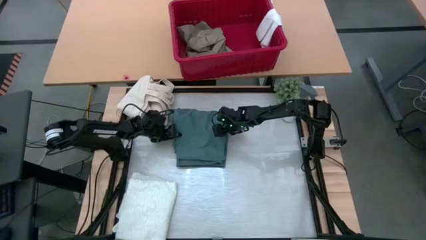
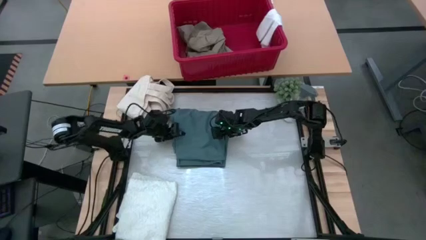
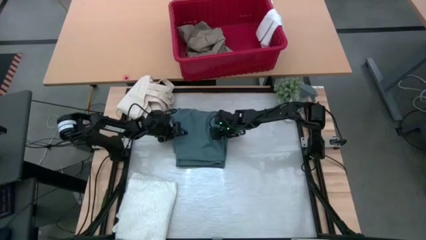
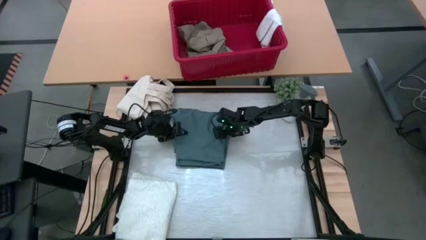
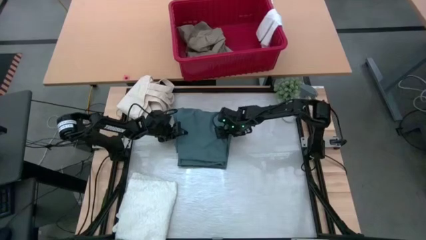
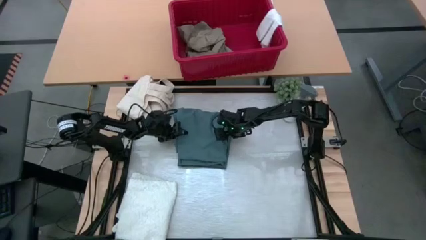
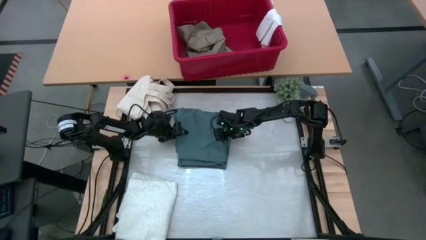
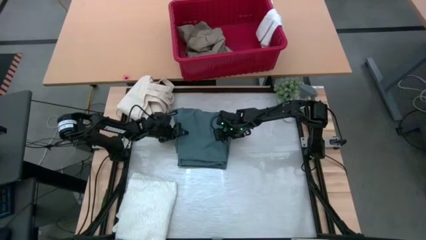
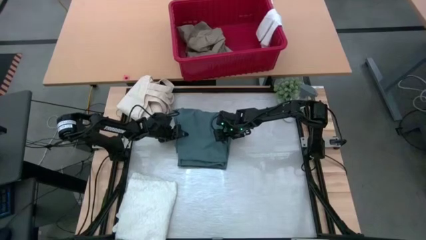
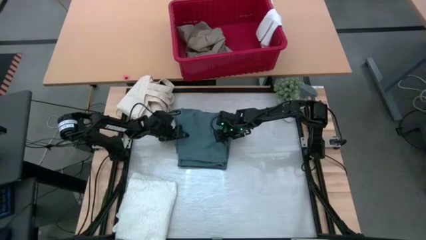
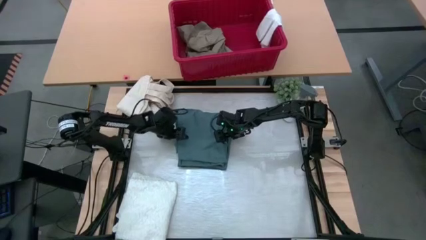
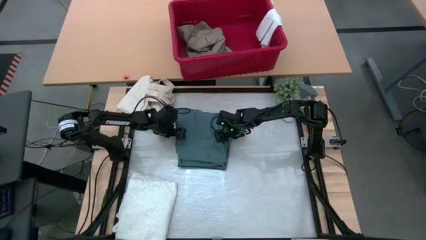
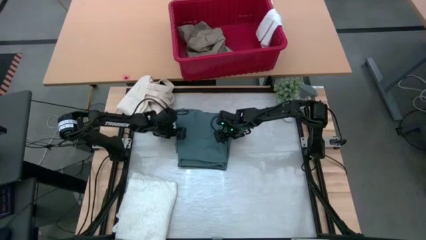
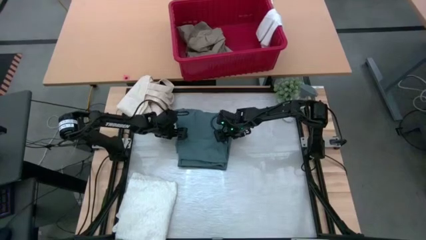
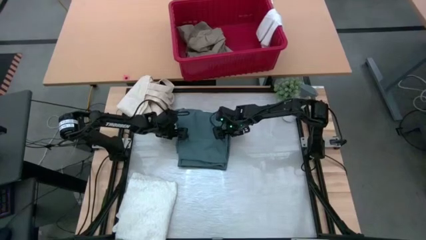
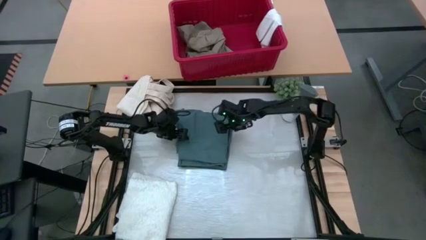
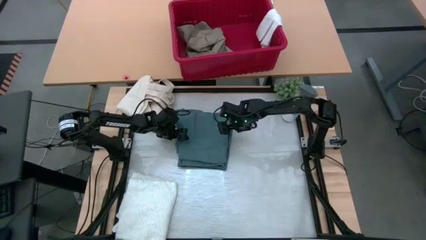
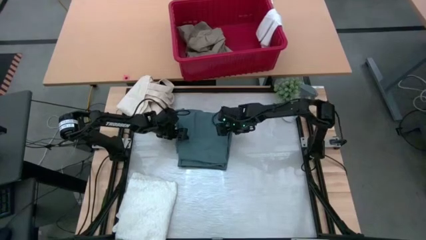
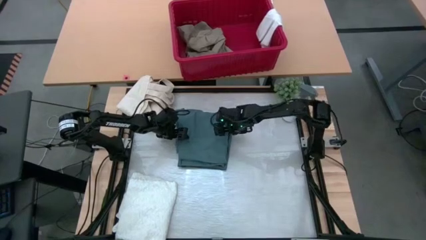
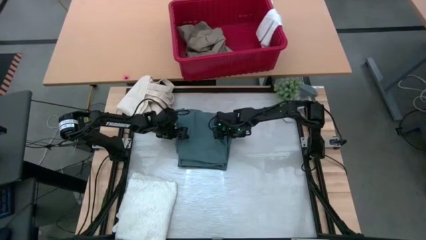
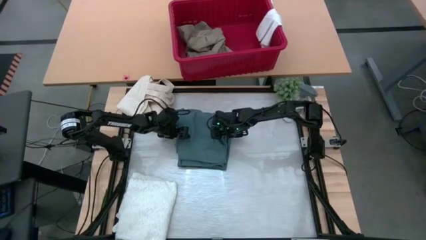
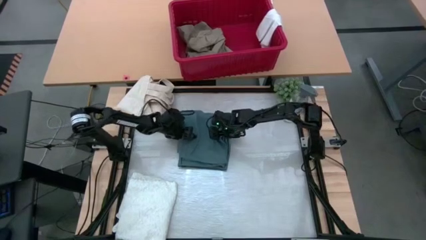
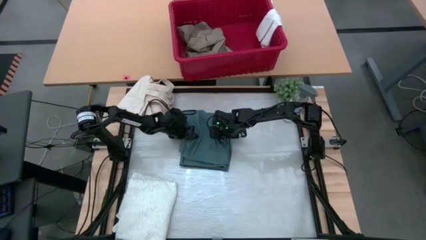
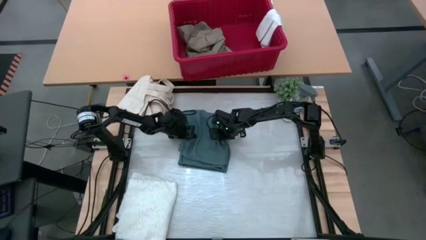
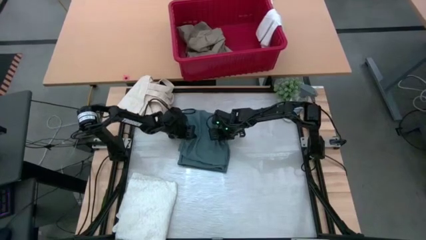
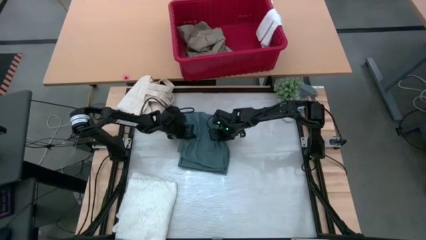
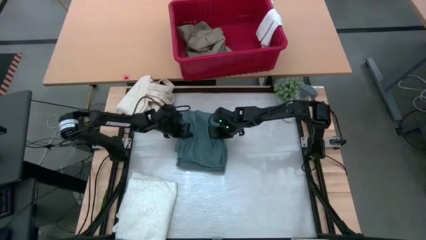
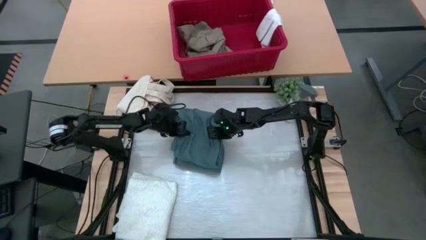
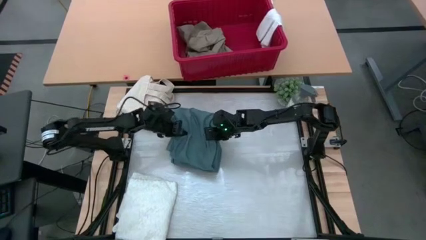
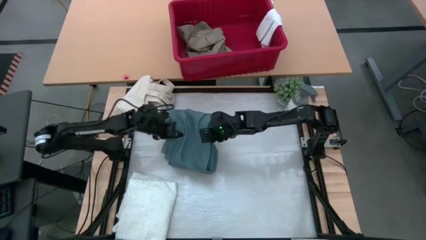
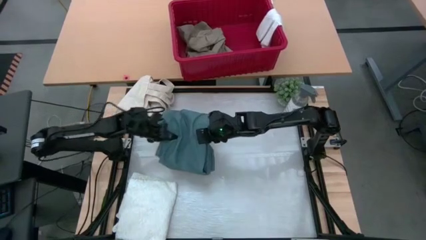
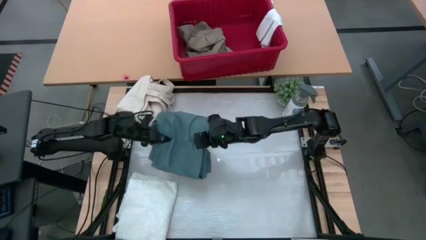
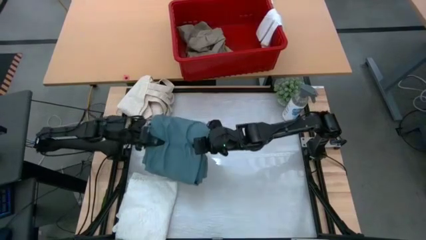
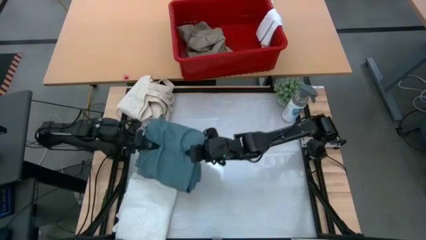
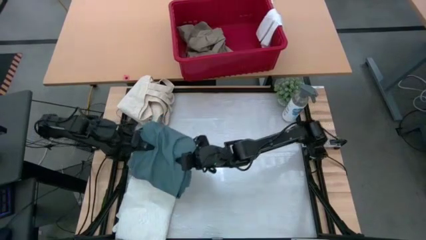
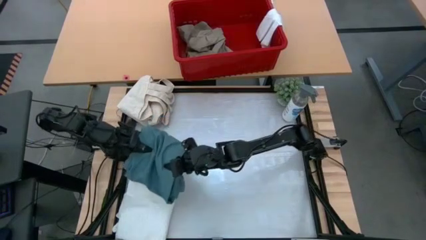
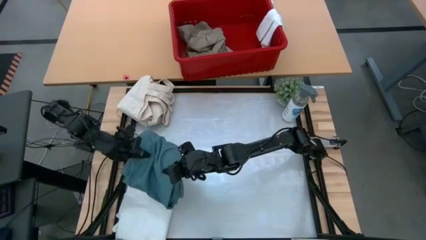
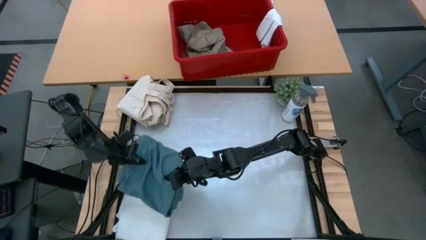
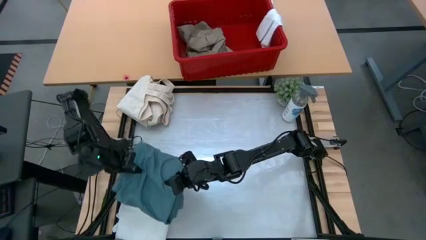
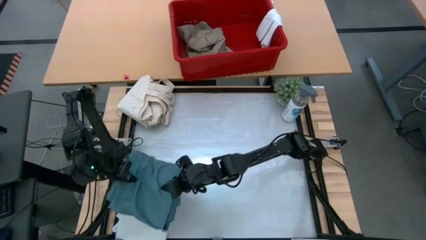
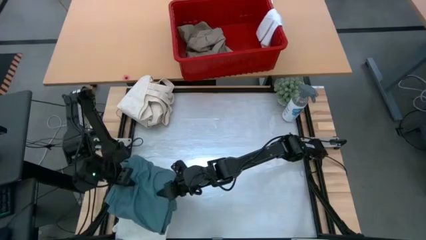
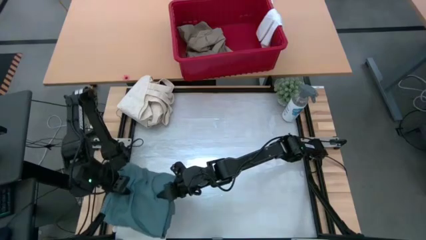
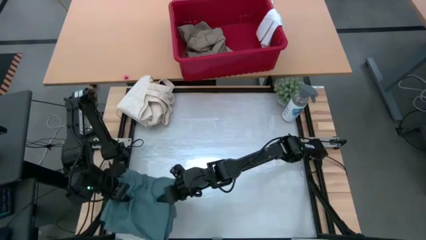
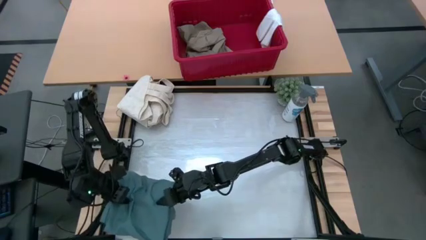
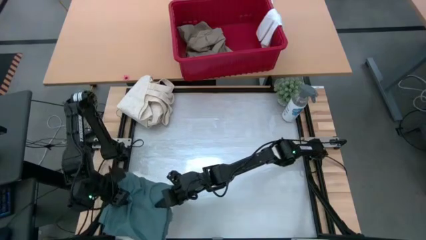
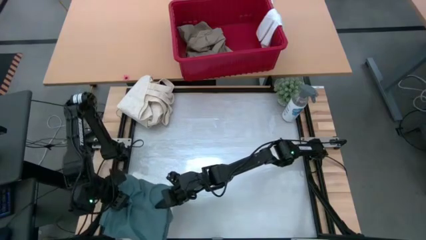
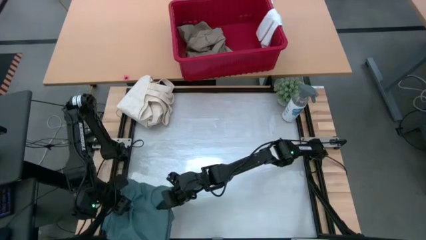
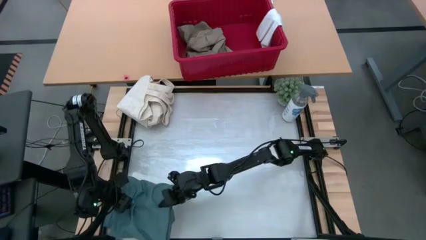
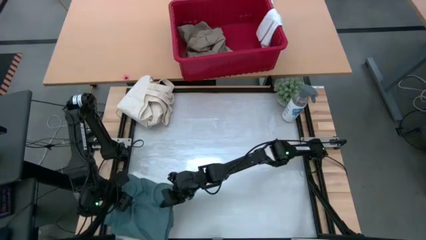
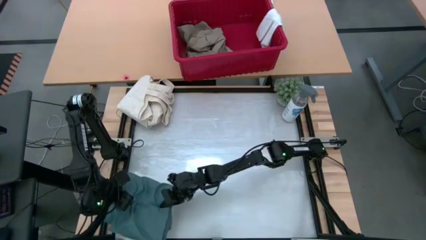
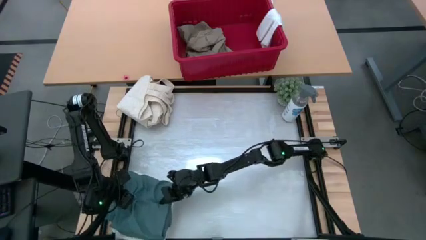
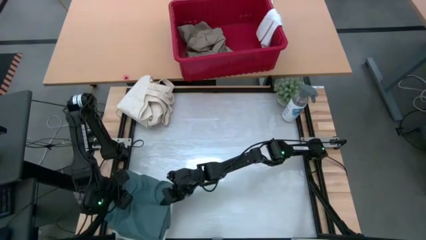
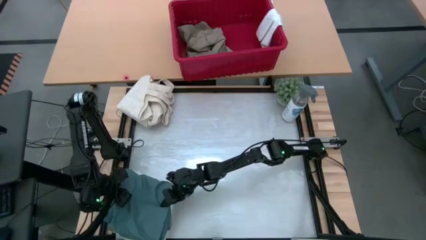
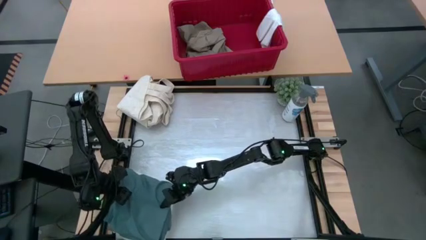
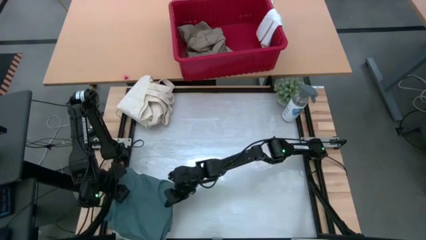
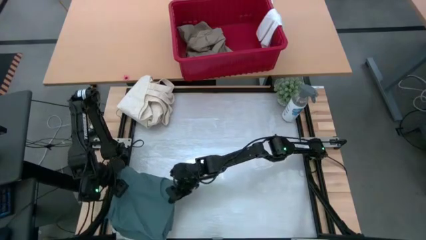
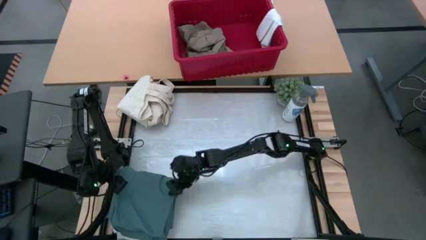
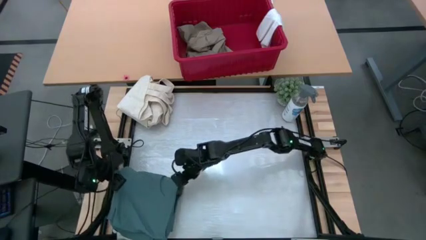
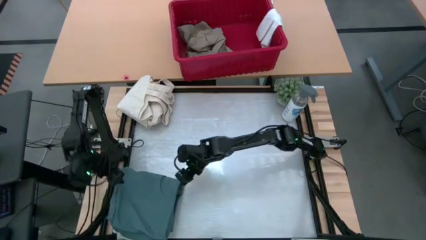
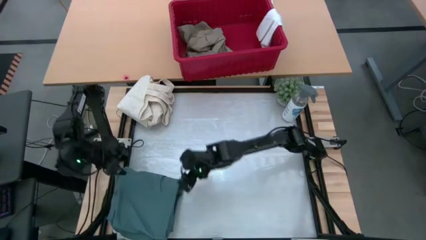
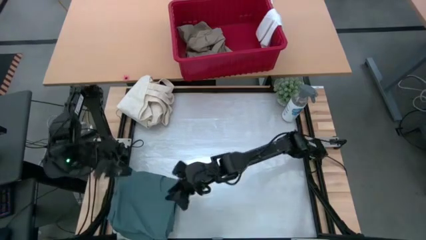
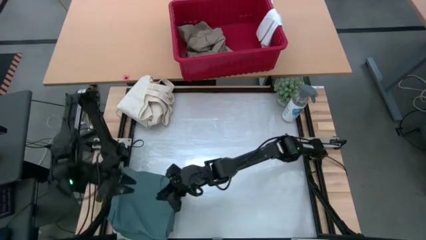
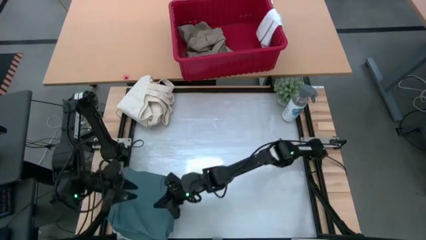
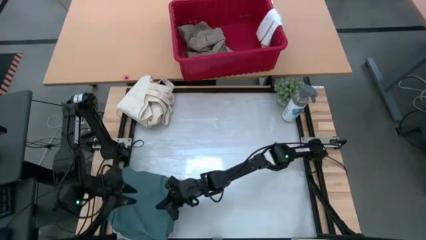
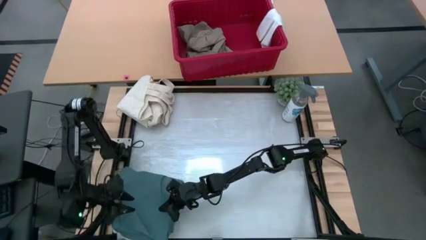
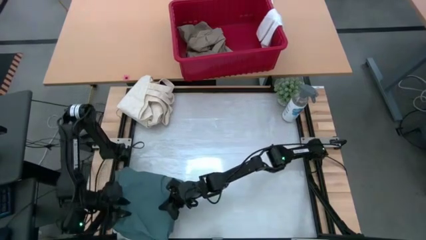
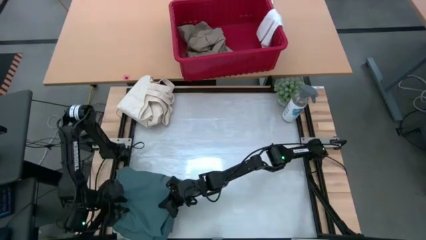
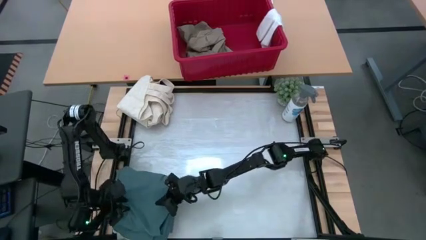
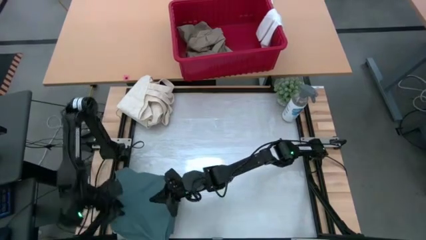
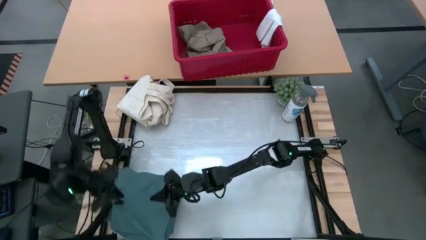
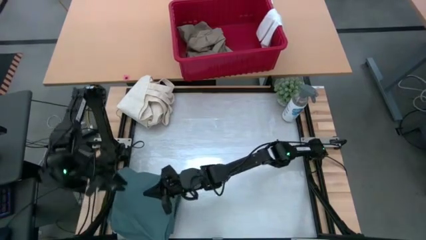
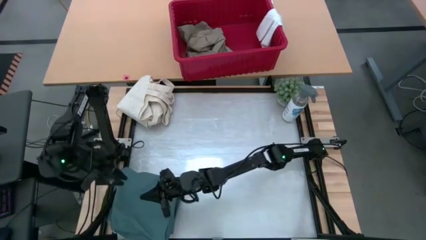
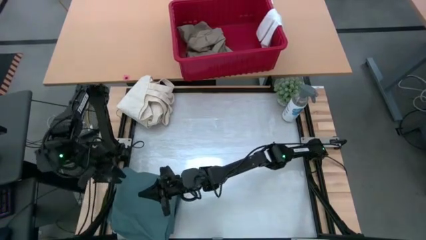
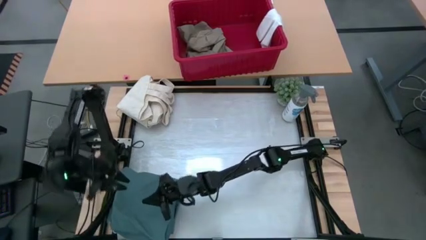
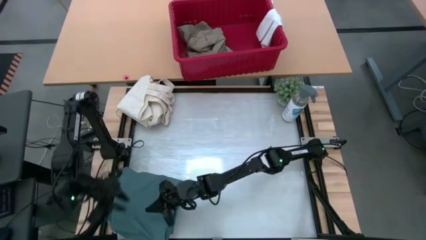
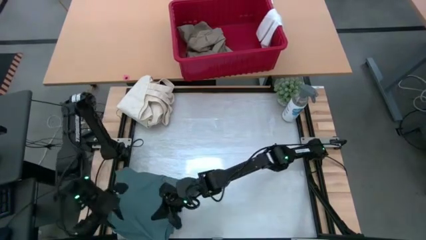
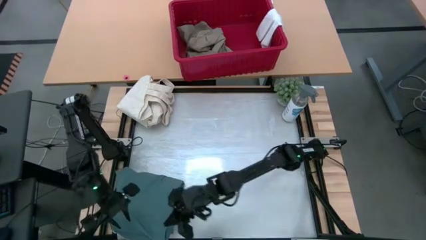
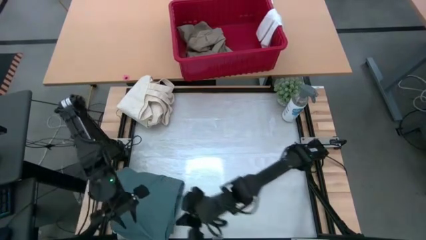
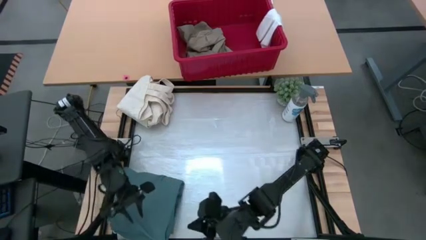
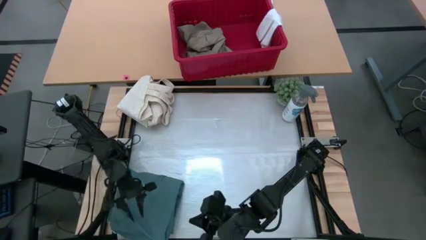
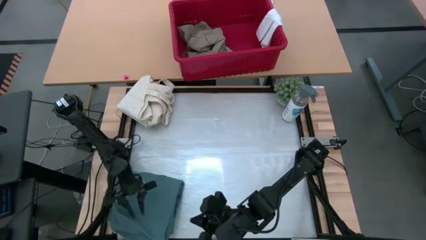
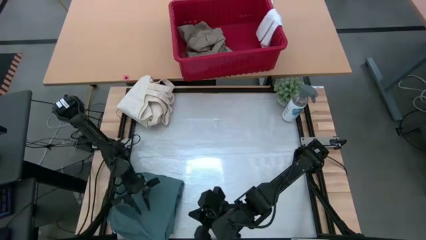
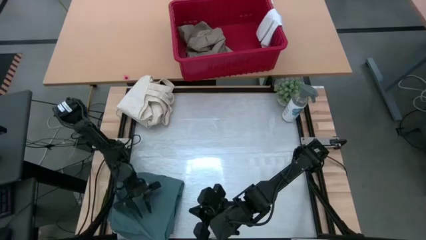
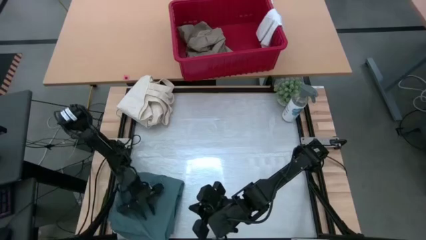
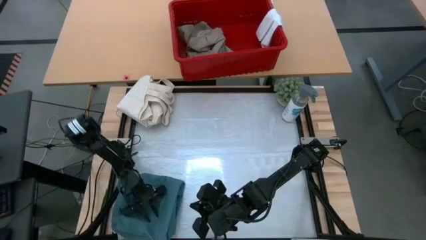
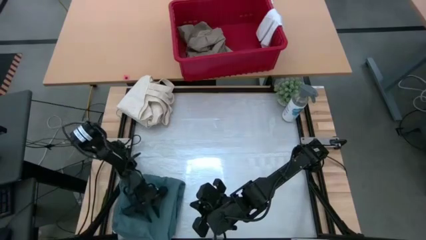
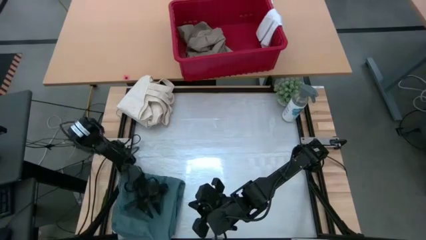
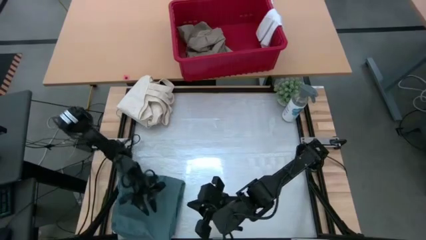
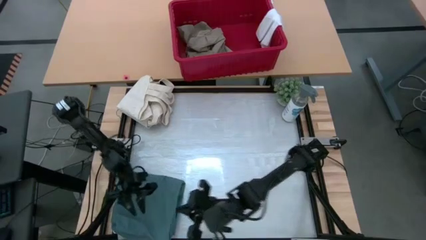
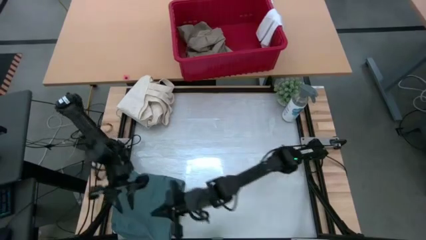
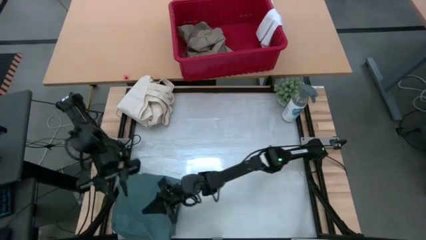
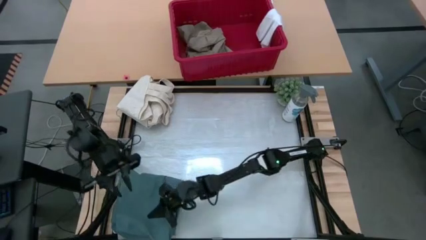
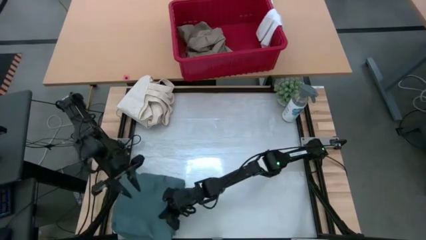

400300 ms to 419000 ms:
Task: Fold Laundry from Bin
Stack the blue pants on top of the white shirt
